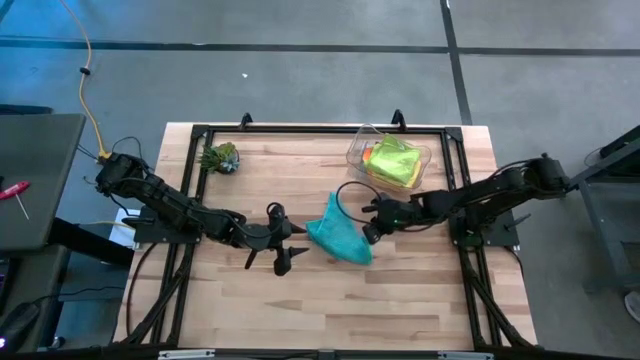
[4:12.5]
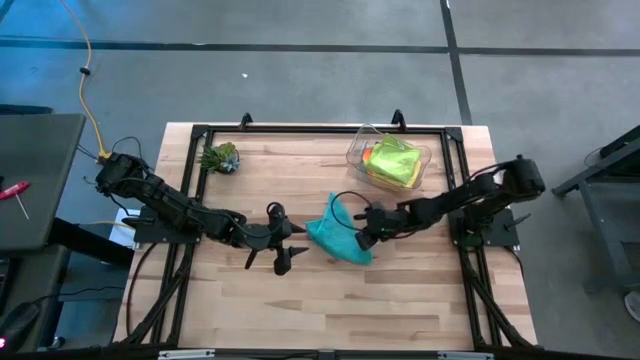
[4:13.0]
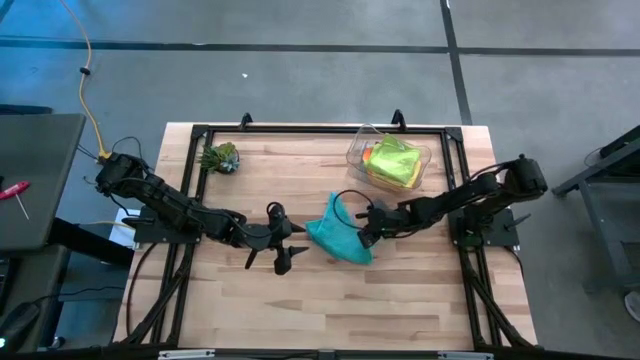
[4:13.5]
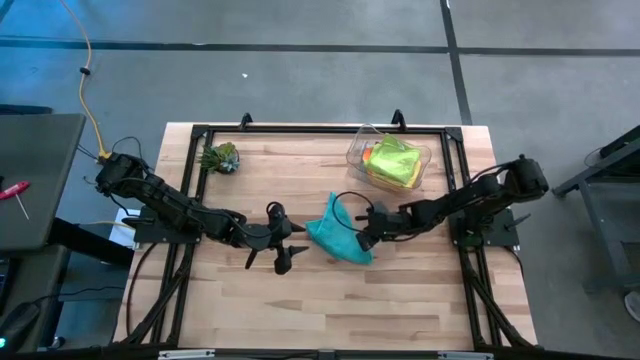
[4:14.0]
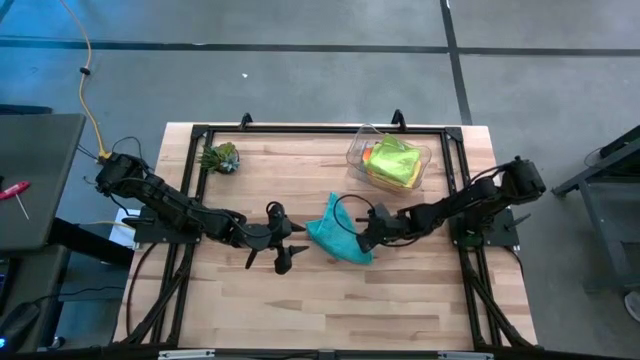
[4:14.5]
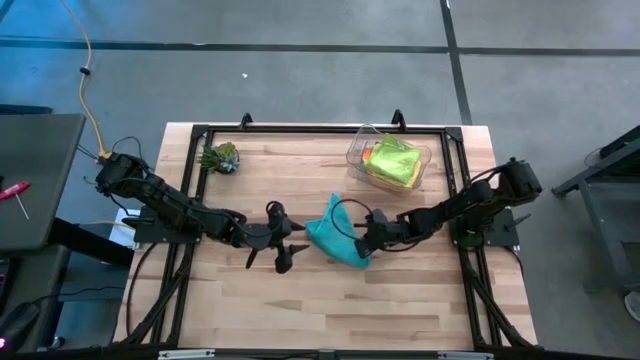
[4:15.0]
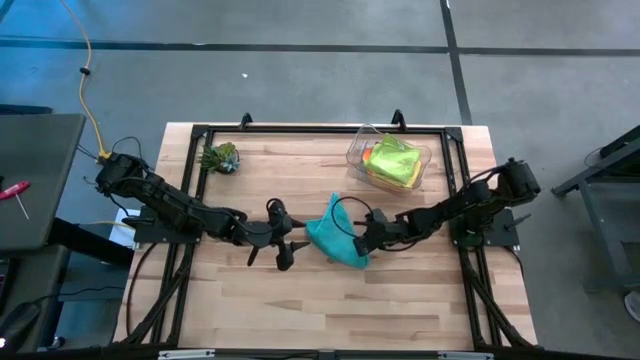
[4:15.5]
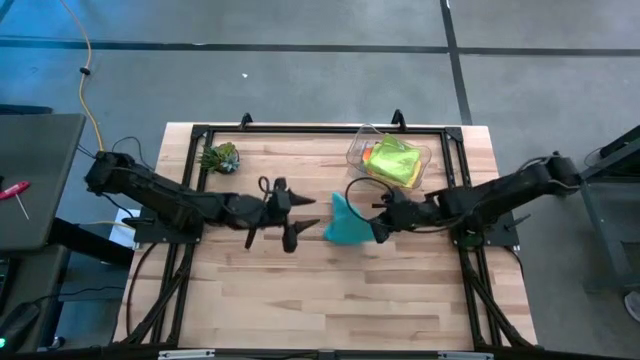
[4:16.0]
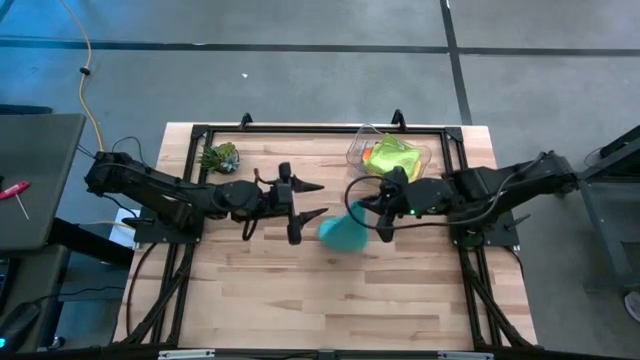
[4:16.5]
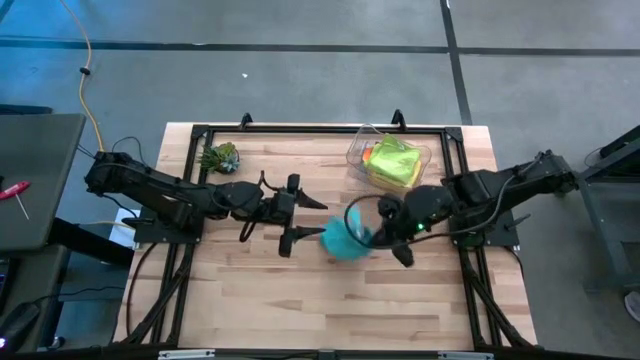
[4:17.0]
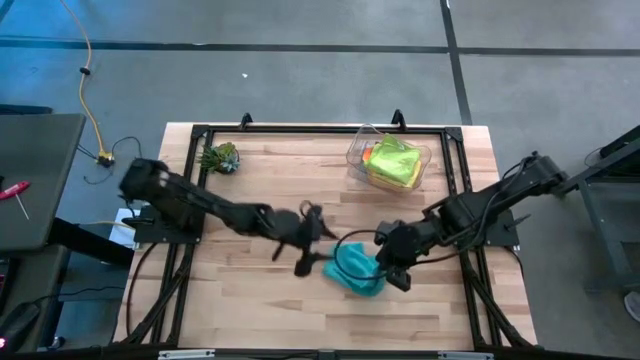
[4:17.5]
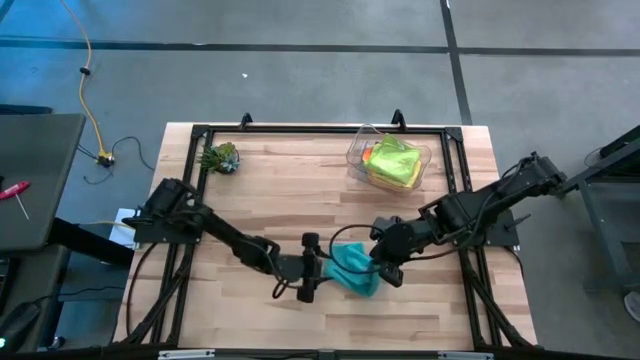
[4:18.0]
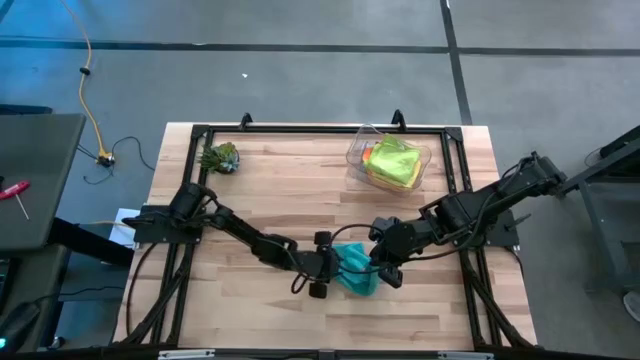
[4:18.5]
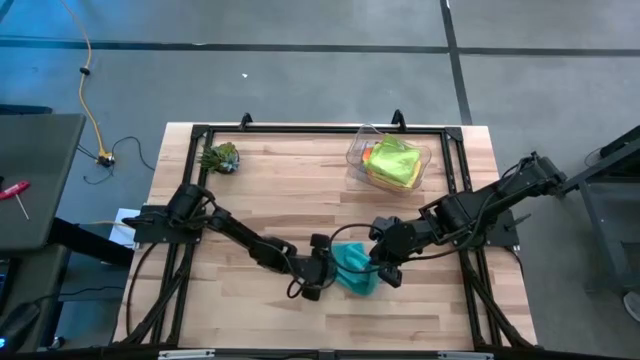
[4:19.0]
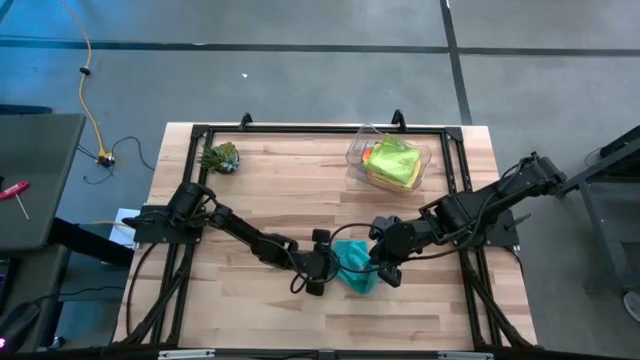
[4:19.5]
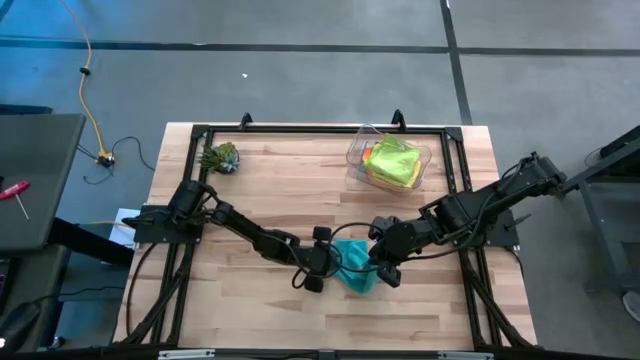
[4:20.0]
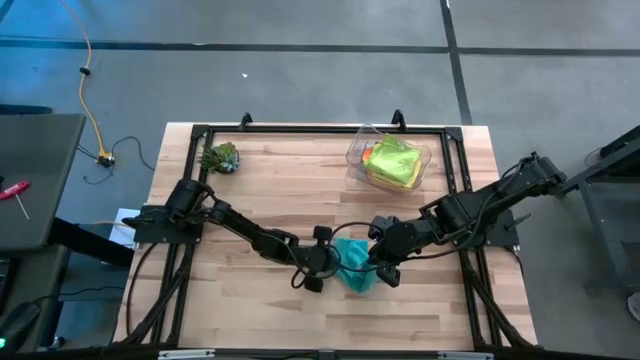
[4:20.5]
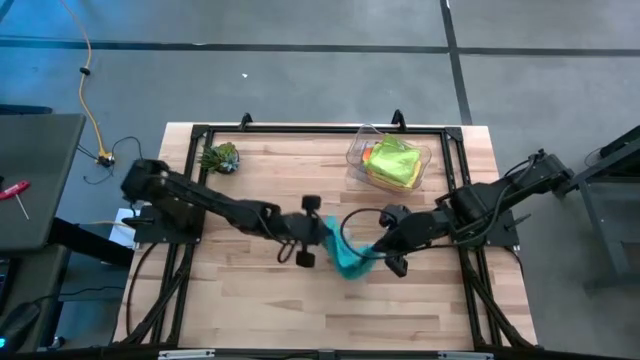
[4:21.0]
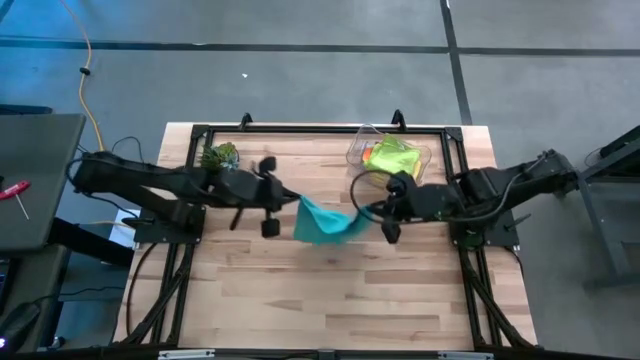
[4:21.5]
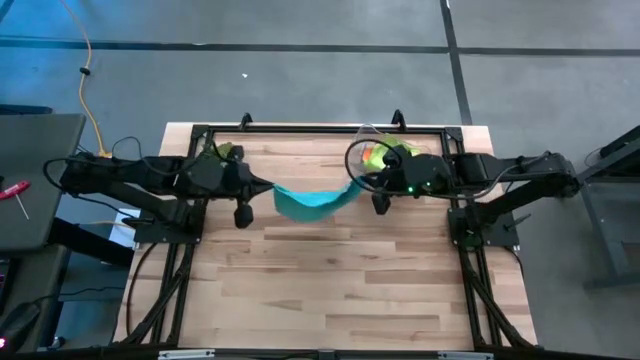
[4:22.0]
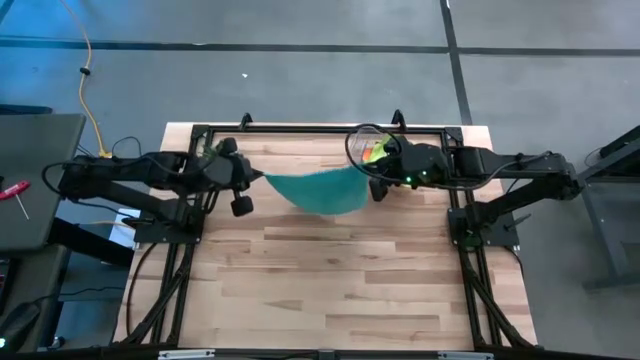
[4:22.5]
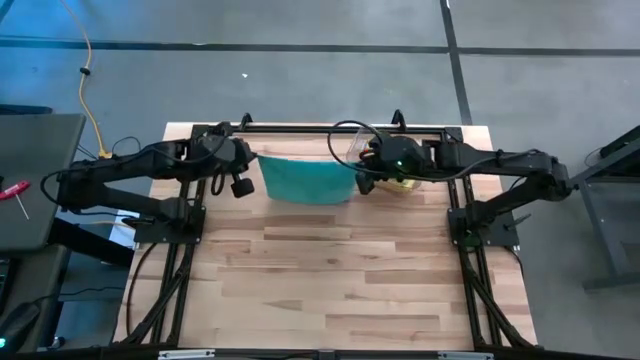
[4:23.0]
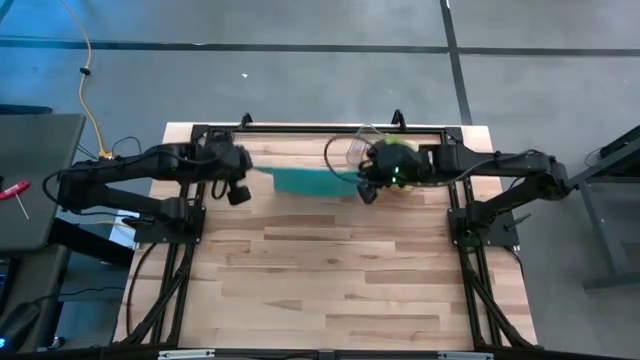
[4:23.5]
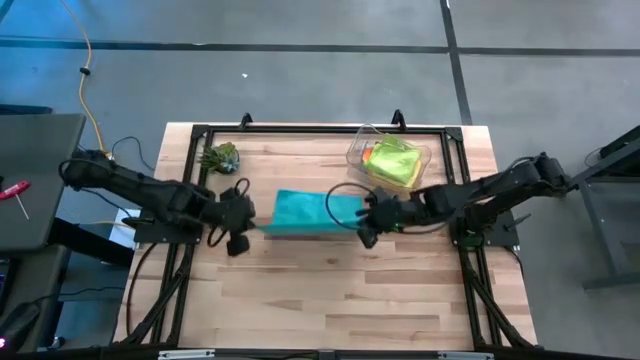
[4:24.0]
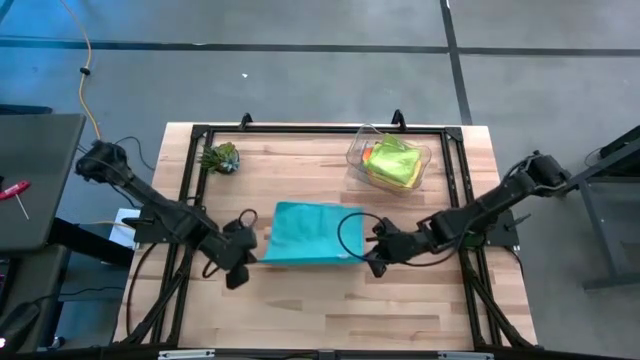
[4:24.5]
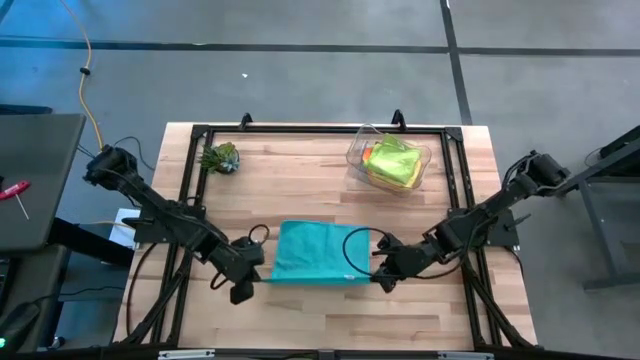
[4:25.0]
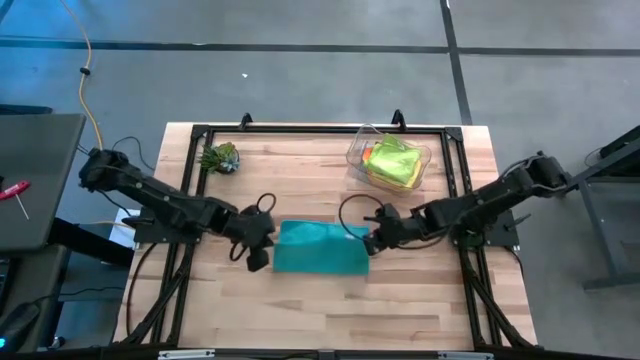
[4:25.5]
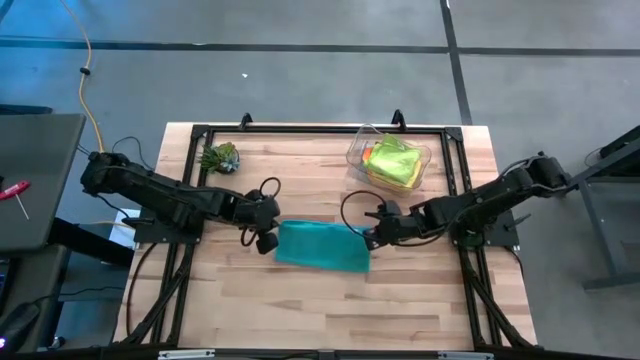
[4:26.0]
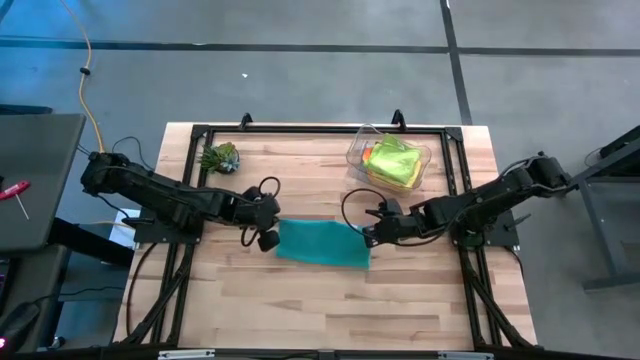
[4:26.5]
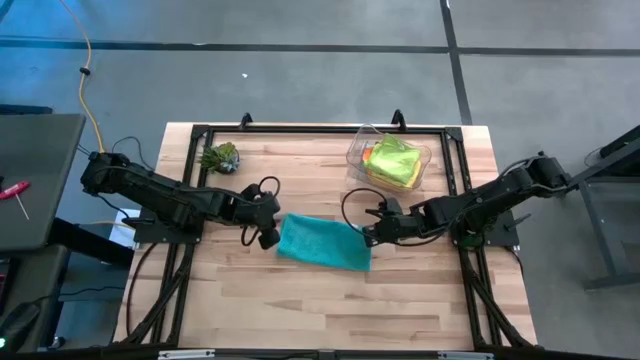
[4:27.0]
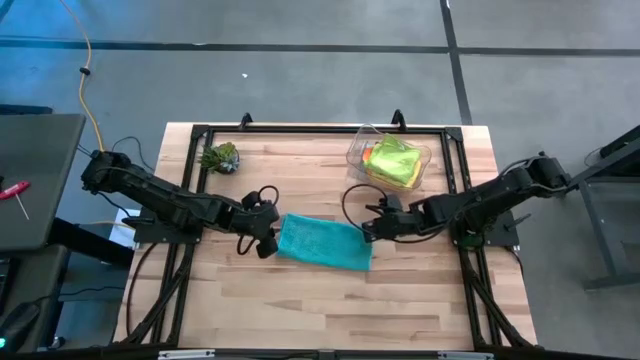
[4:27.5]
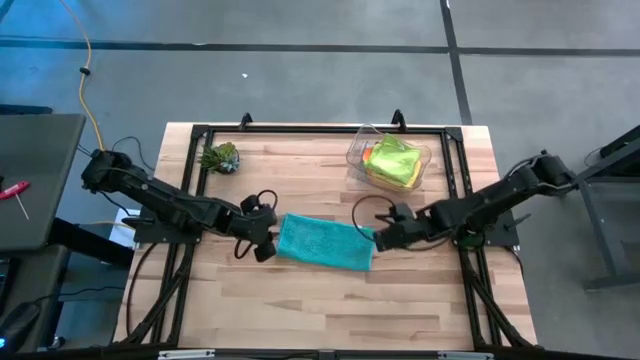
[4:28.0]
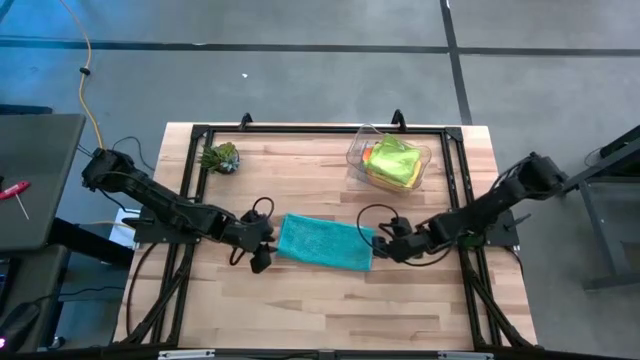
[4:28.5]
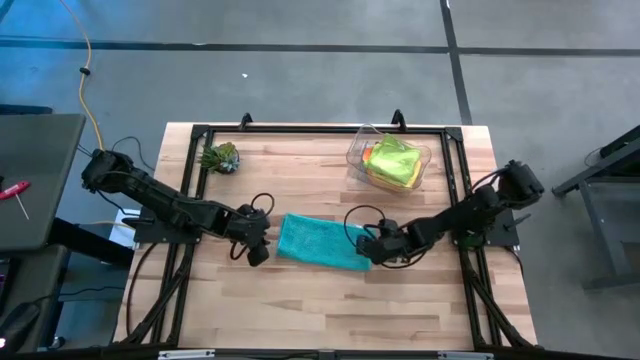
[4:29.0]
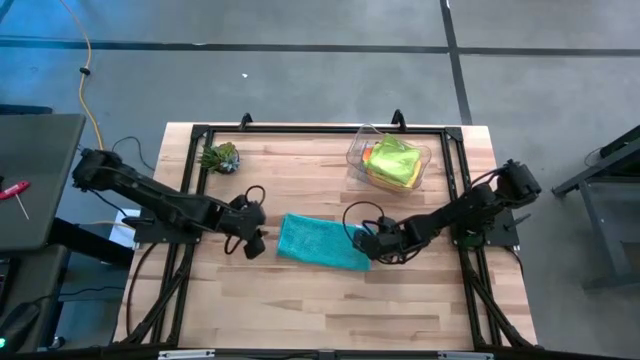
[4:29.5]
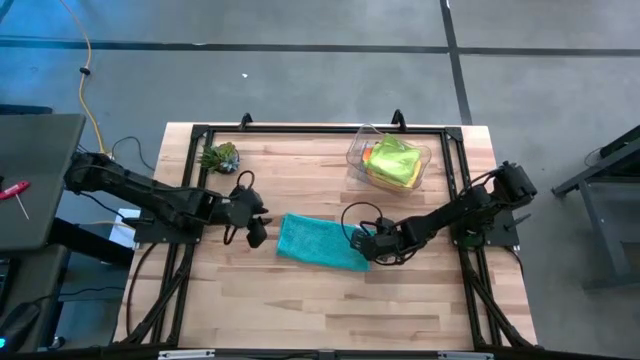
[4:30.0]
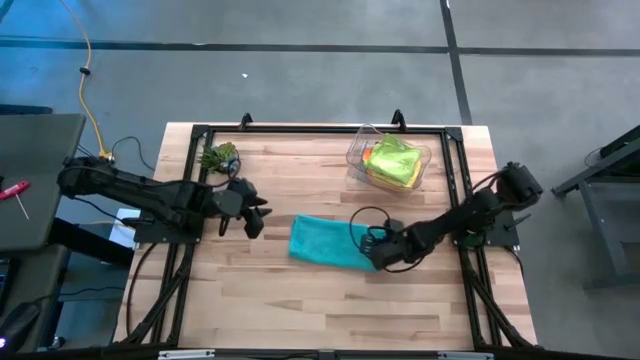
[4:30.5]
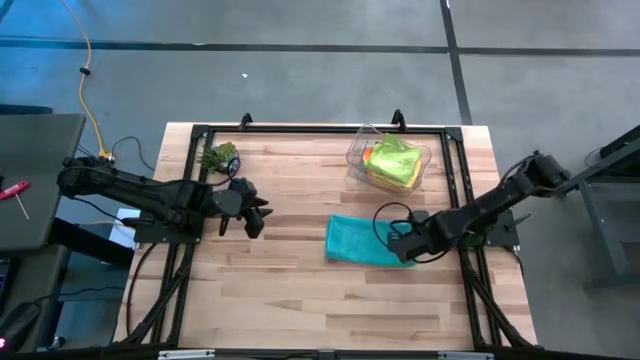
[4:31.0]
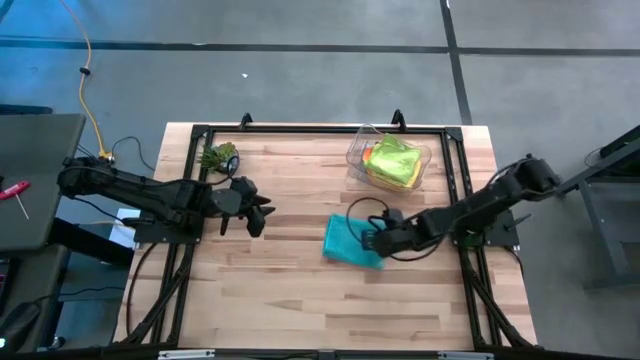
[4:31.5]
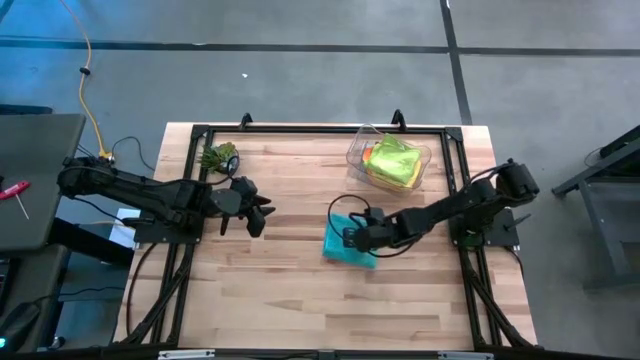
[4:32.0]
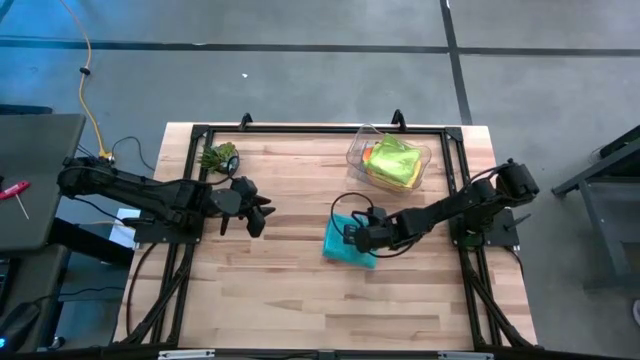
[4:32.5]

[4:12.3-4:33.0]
Task: Fold microfiber towels
Fold the blue microfiber towel
